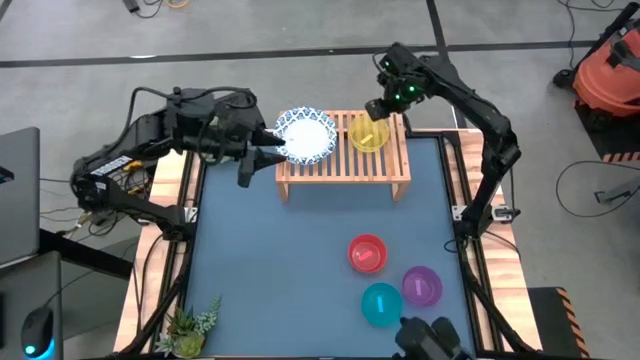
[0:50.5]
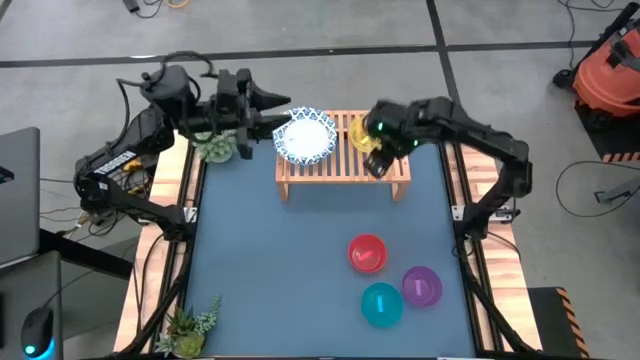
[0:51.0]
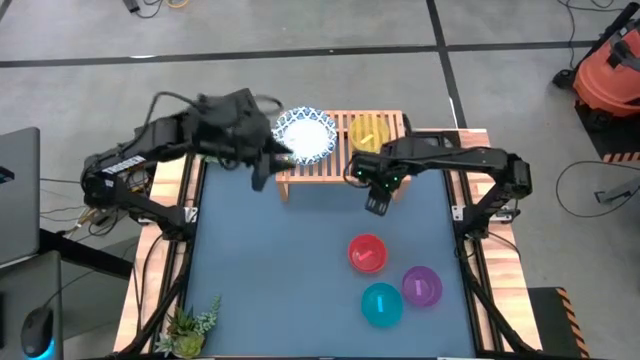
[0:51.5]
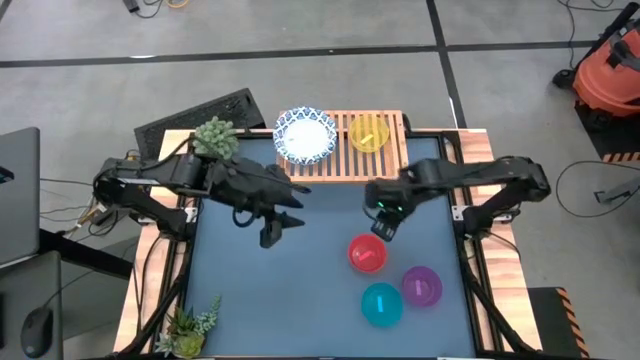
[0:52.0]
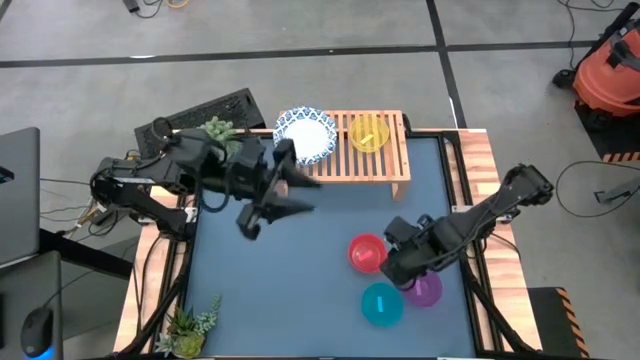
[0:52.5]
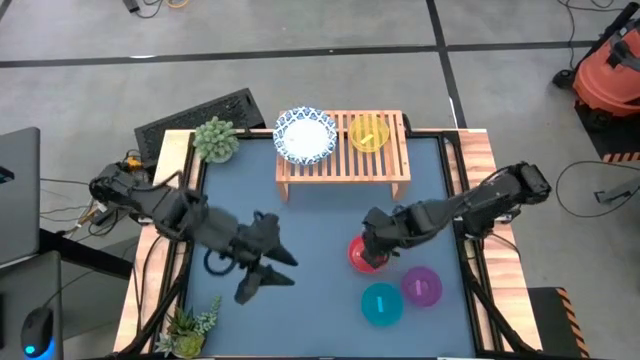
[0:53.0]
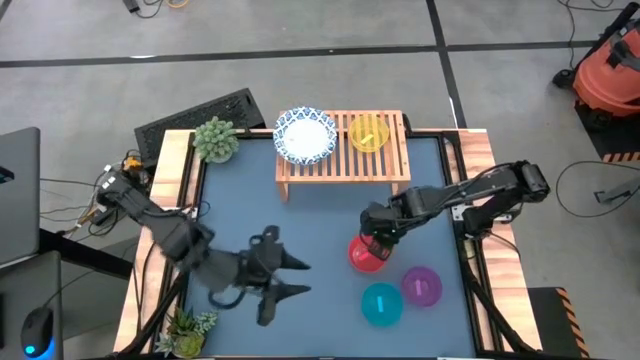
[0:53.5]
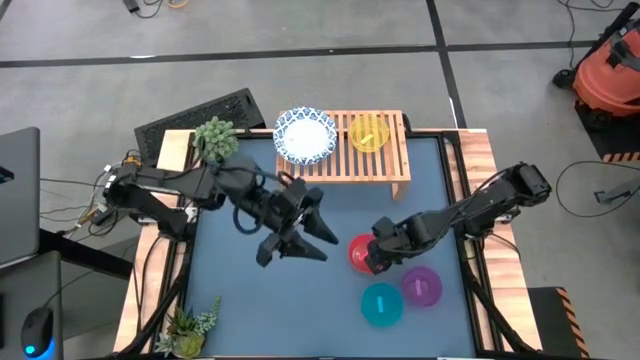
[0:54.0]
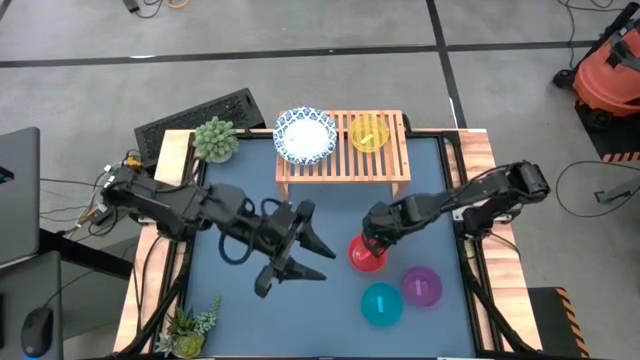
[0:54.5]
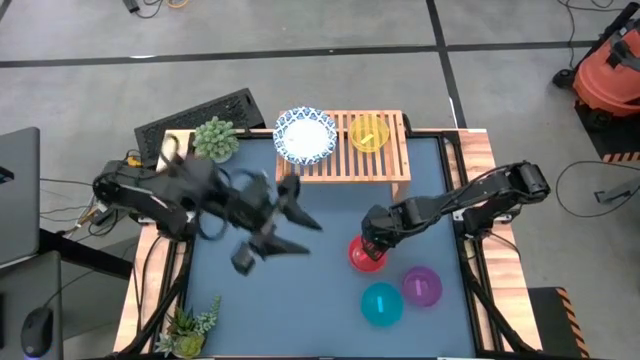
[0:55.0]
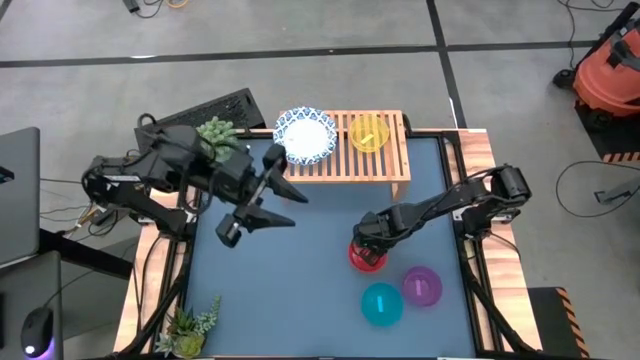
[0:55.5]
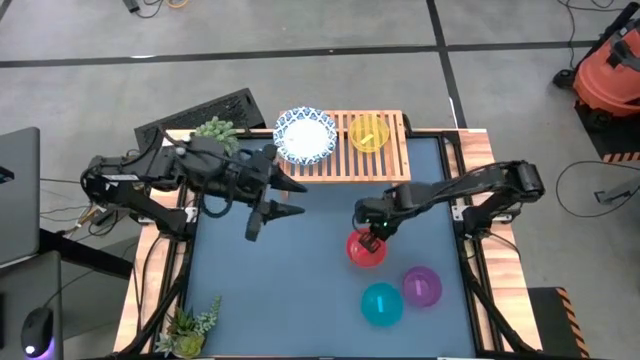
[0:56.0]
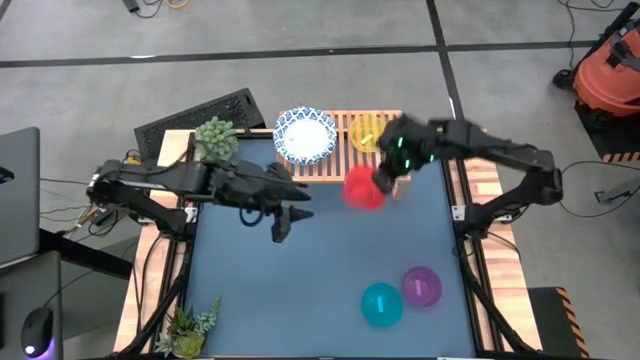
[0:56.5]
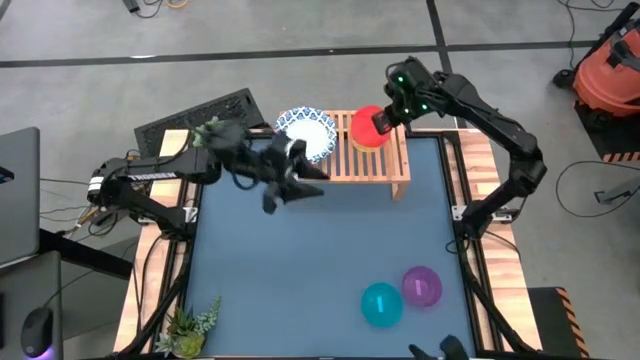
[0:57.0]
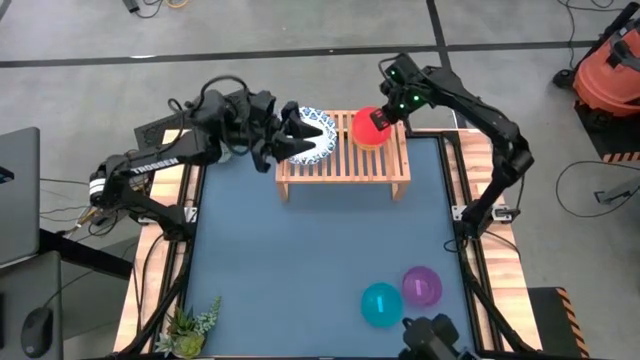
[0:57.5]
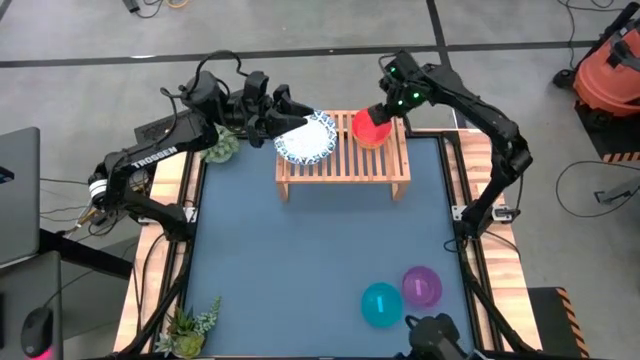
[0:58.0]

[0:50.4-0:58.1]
Task: Place and stack bowls onto a shelf
Stack the orange bowl on top of the yellow bowl on the shelf

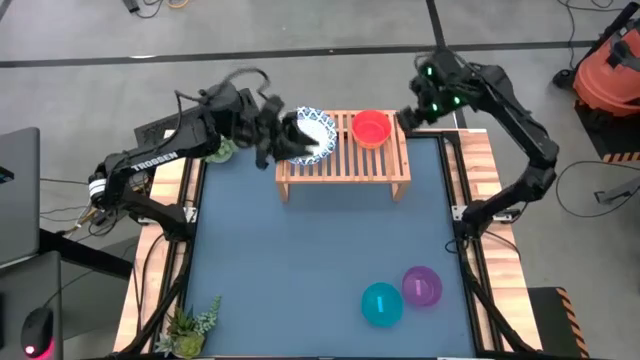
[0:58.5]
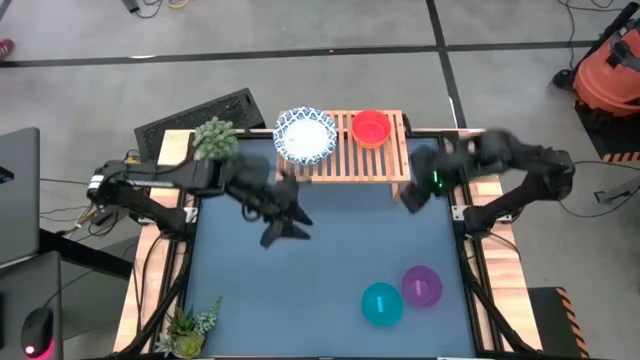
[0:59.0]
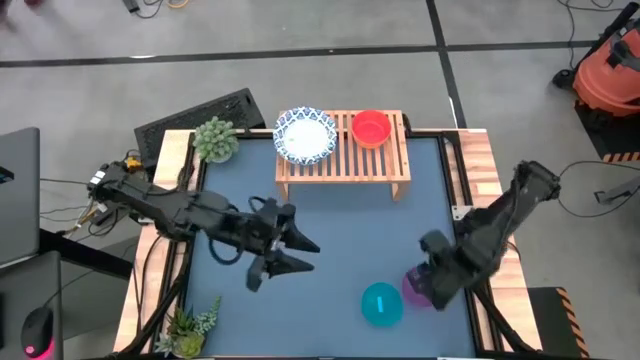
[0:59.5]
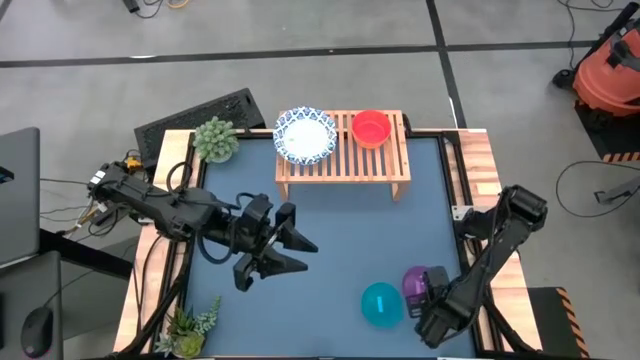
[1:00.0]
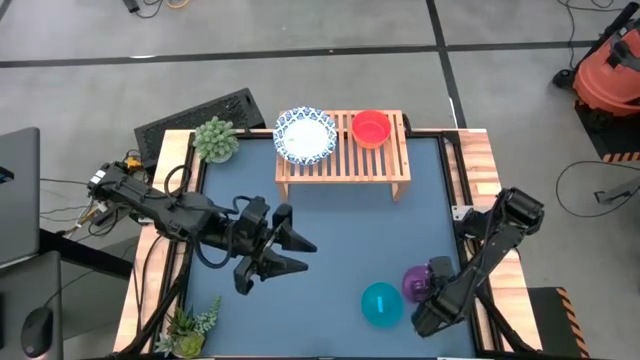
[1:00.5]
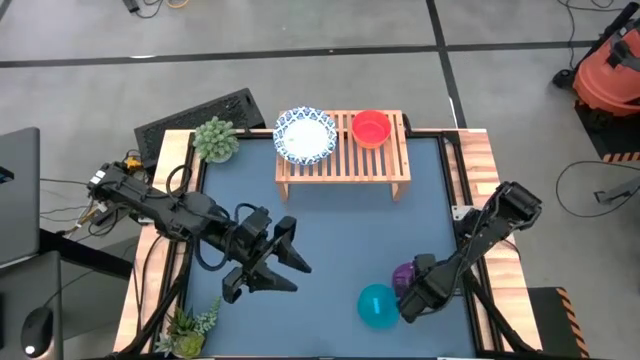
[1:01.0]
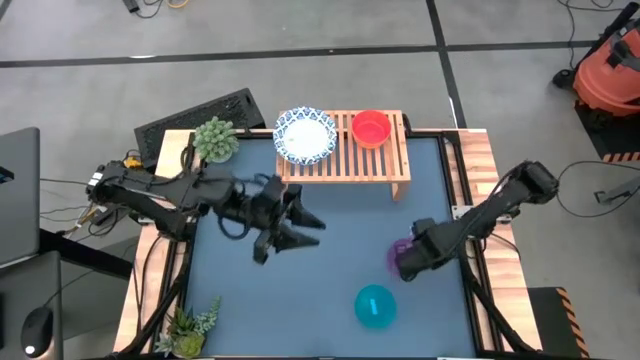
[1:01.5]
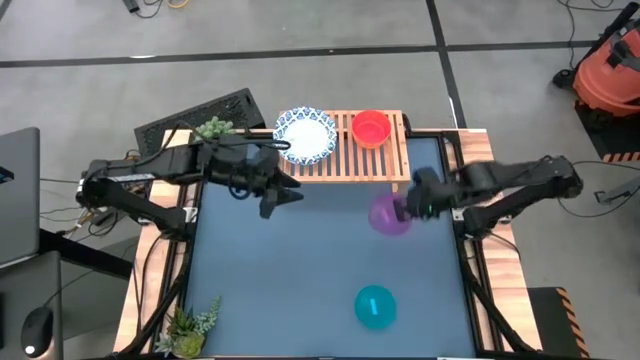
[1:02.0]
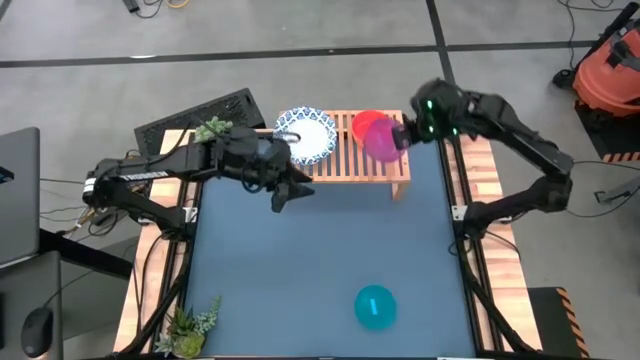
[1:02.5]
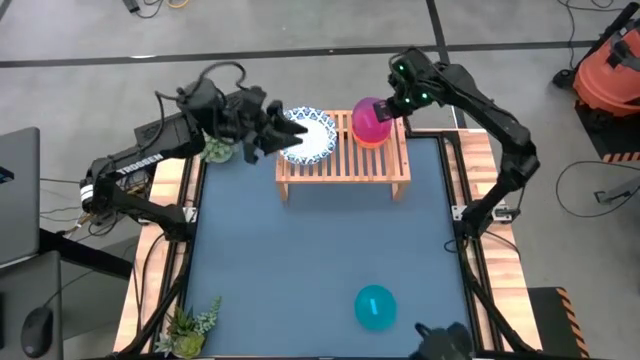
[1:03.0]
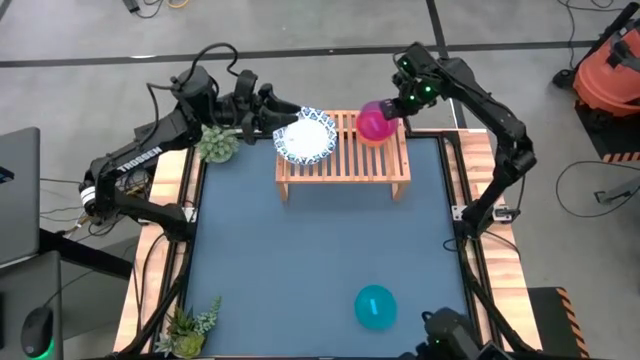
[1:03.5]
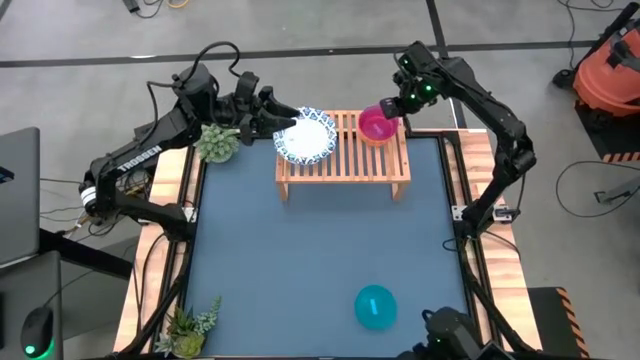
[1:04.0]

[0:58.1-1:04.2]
Stack the violet bowl on top of the orange bowl on the shelf

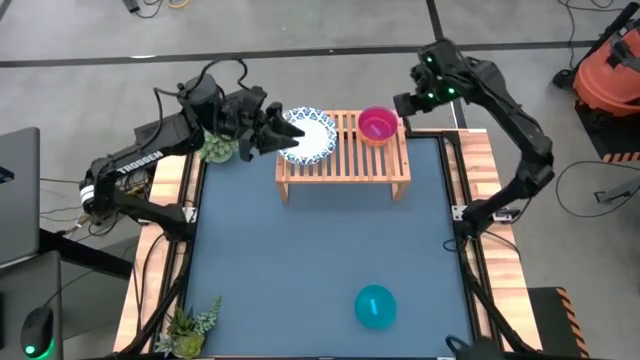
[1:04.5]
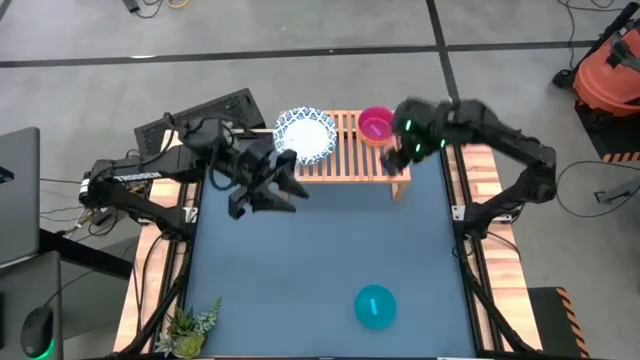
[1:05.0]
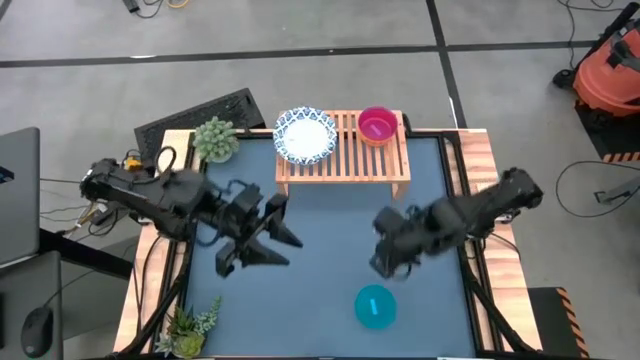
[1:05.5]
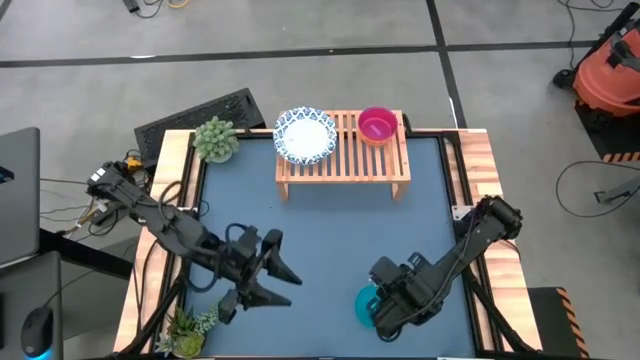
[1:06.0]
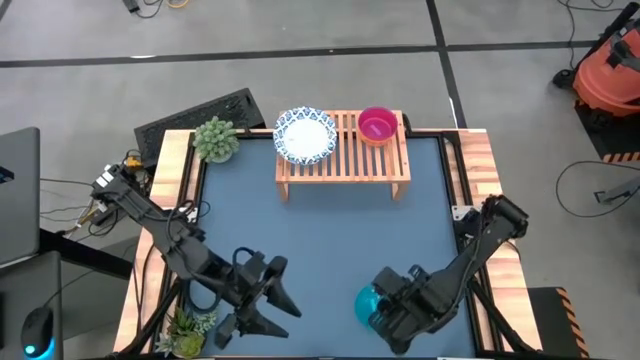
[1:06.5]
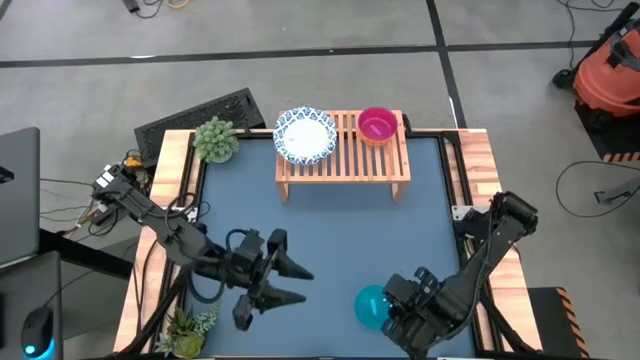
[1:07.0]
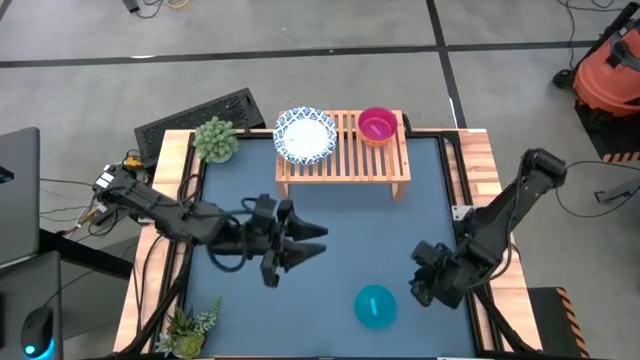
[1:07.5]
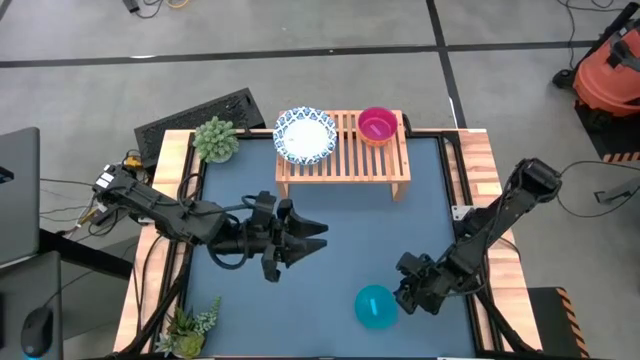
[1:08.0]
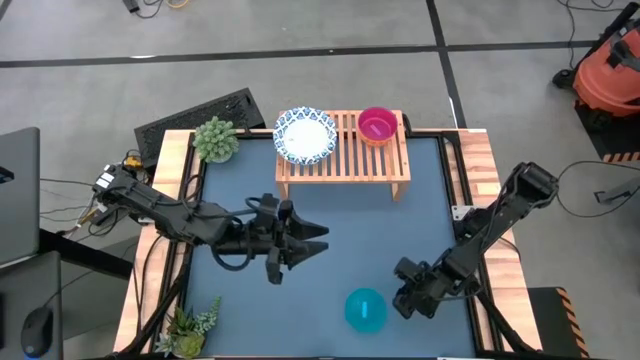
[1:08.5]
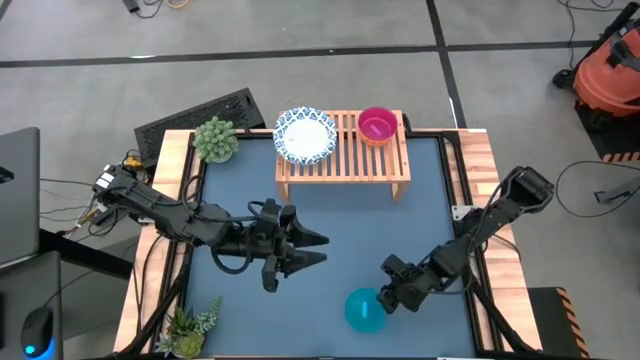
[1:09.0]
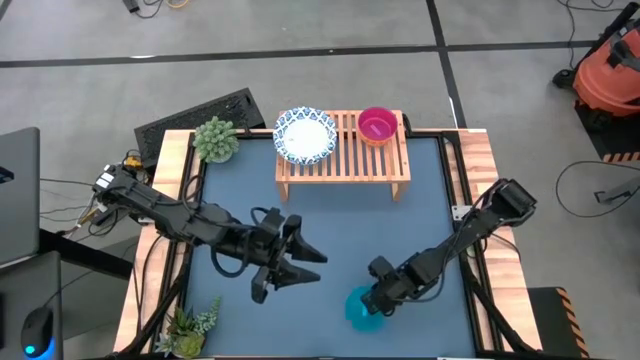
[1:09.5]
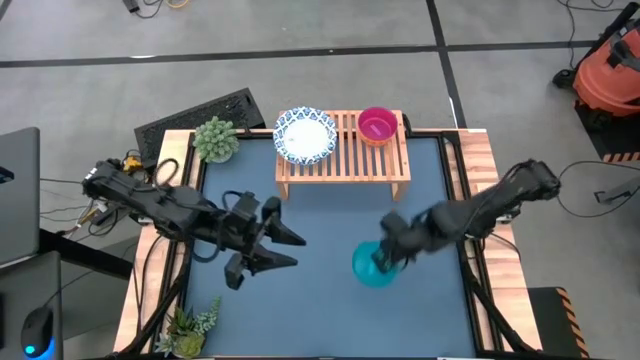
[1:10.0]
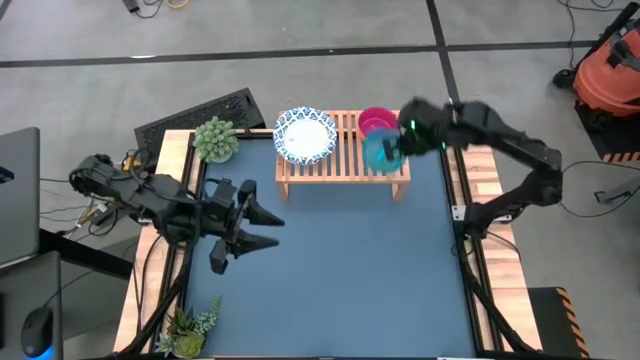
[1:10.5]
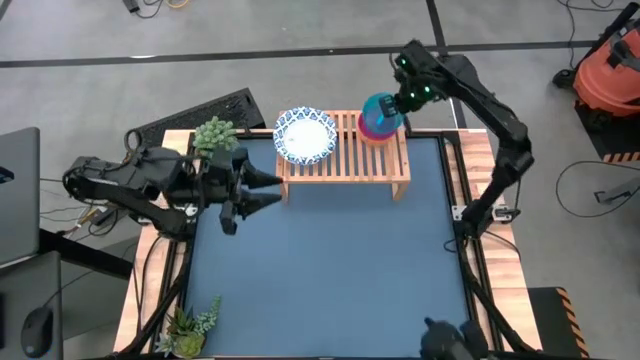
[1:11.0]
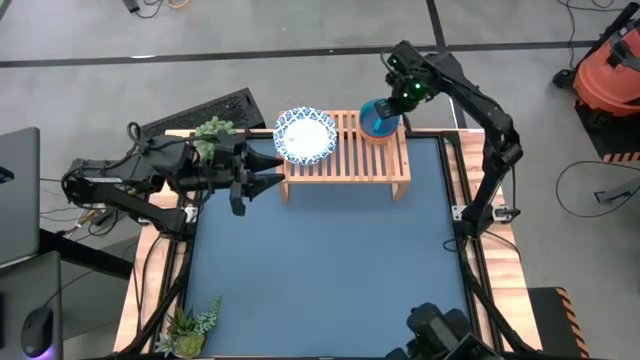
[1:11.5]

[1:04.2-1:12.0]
Stack the blue bowl on top of the violet bowl on the shelf
